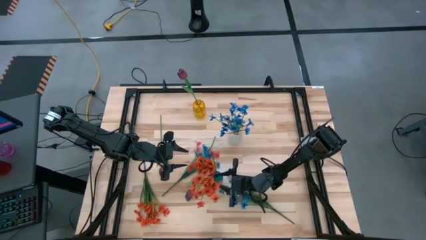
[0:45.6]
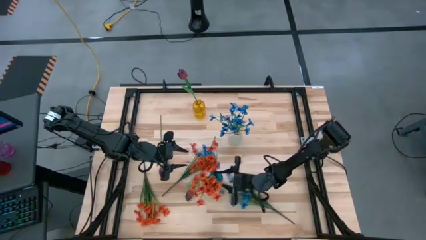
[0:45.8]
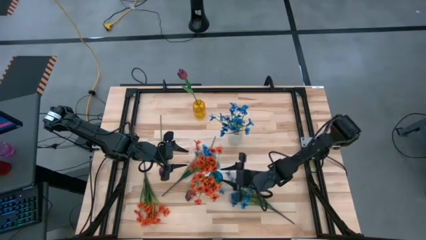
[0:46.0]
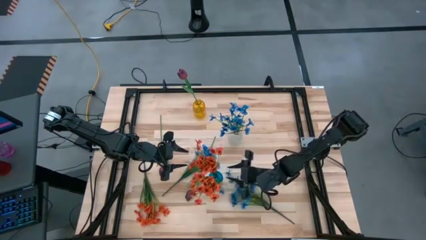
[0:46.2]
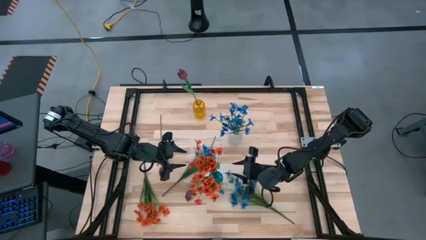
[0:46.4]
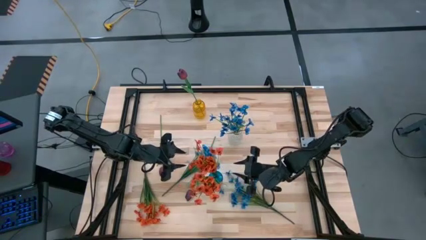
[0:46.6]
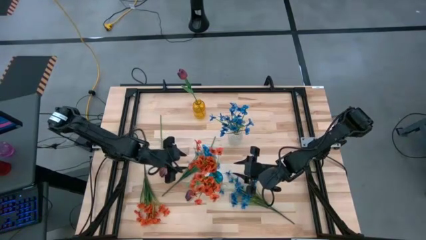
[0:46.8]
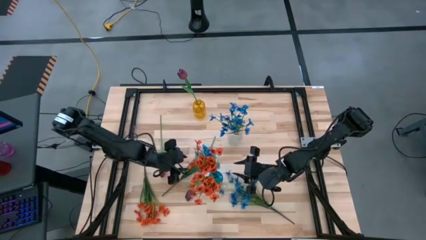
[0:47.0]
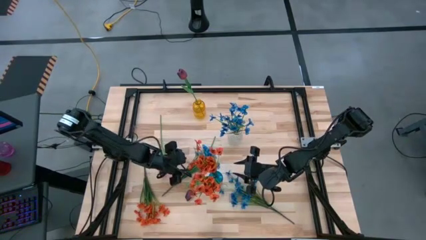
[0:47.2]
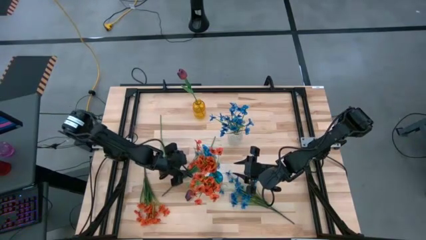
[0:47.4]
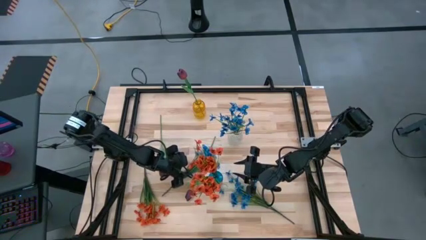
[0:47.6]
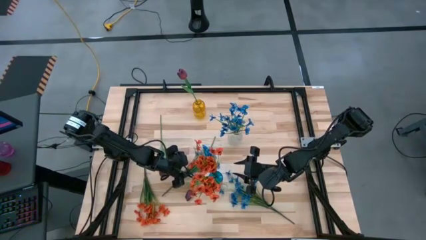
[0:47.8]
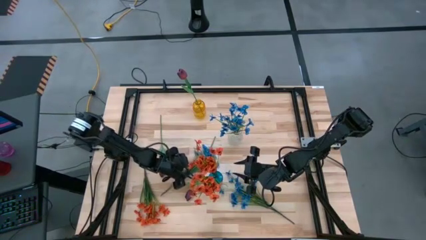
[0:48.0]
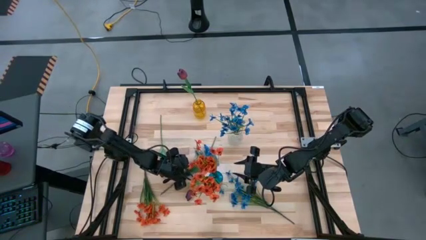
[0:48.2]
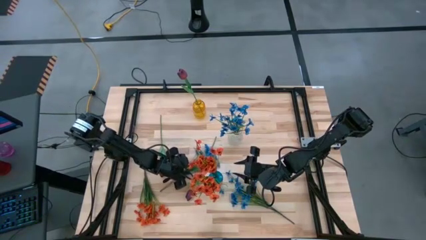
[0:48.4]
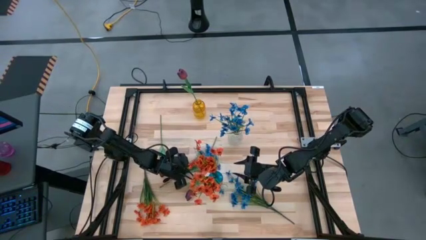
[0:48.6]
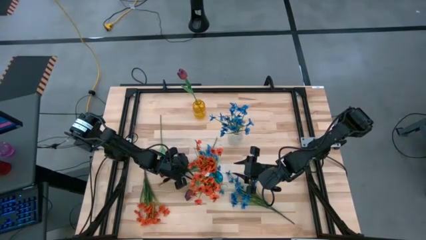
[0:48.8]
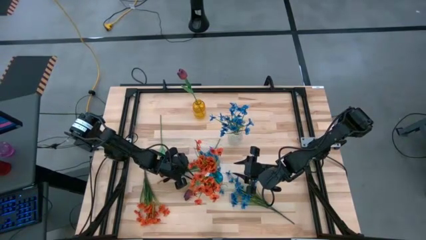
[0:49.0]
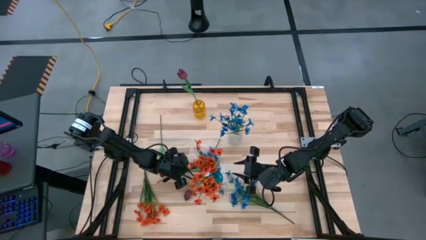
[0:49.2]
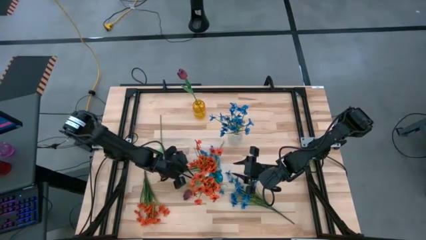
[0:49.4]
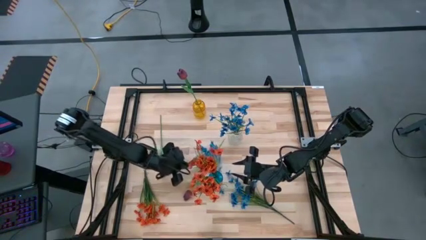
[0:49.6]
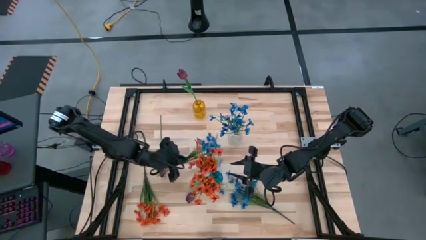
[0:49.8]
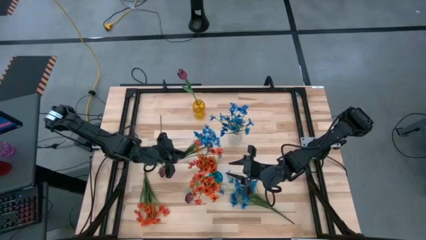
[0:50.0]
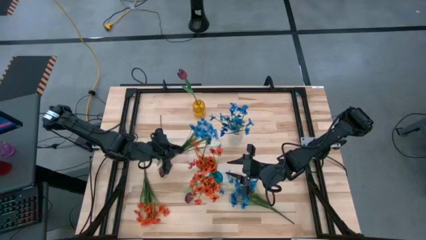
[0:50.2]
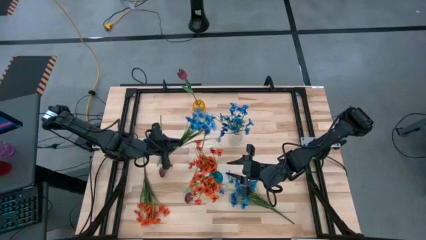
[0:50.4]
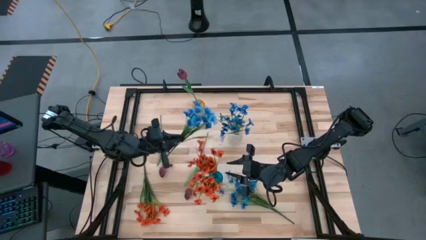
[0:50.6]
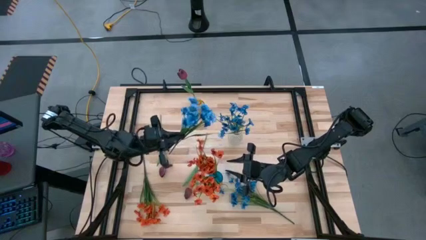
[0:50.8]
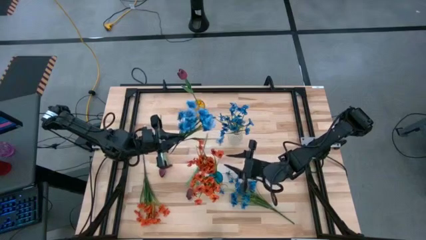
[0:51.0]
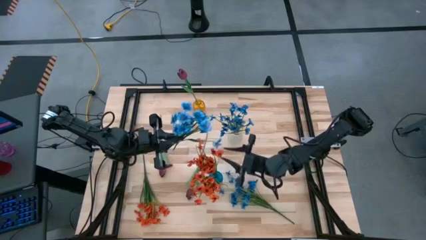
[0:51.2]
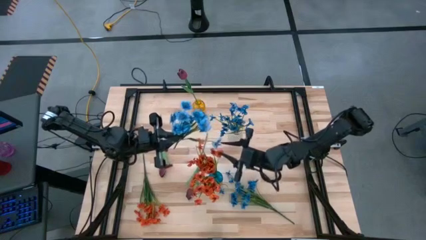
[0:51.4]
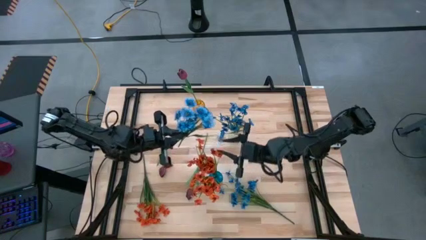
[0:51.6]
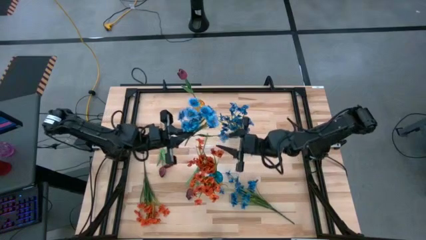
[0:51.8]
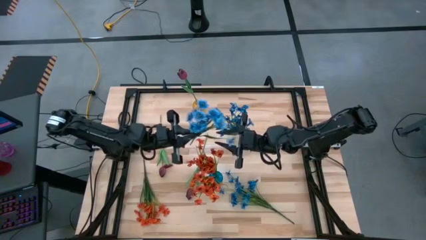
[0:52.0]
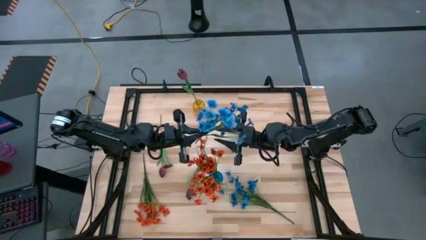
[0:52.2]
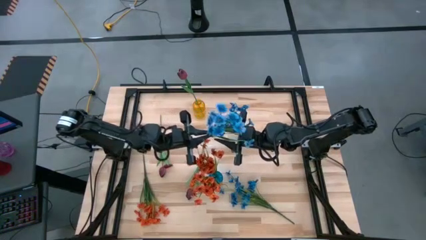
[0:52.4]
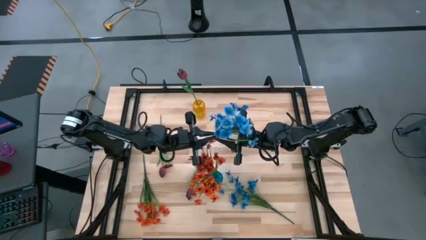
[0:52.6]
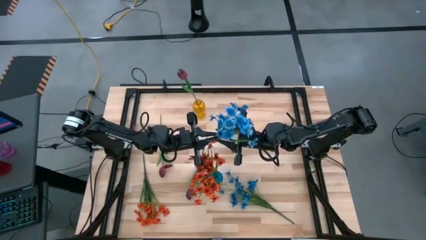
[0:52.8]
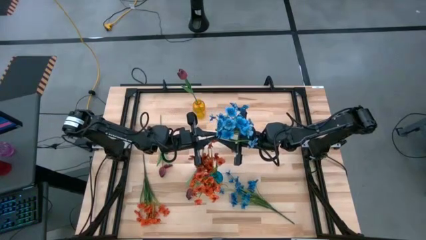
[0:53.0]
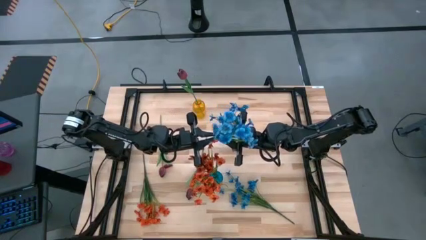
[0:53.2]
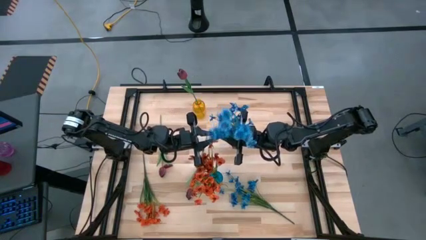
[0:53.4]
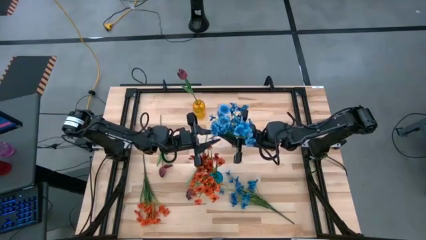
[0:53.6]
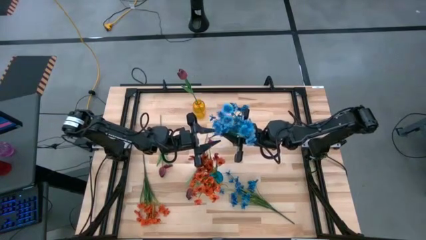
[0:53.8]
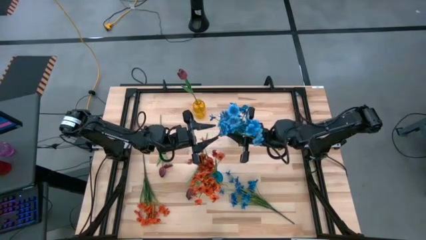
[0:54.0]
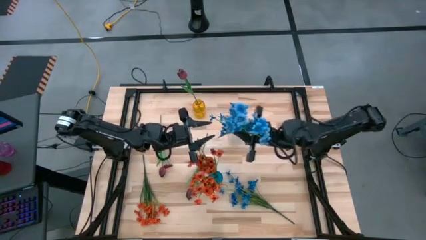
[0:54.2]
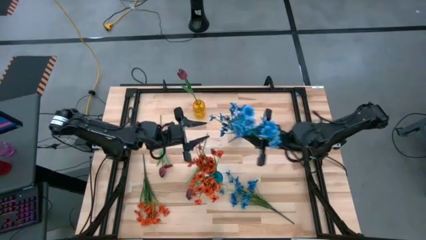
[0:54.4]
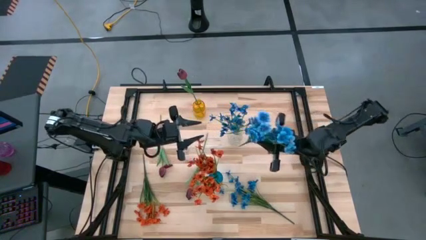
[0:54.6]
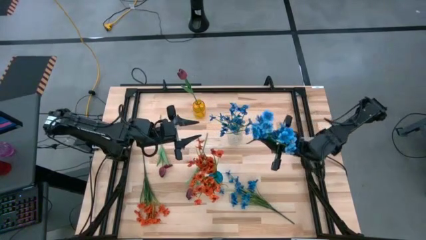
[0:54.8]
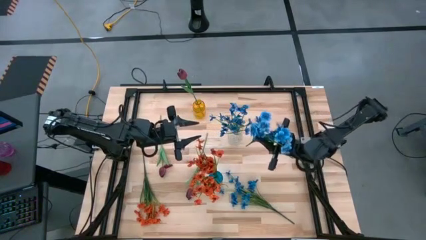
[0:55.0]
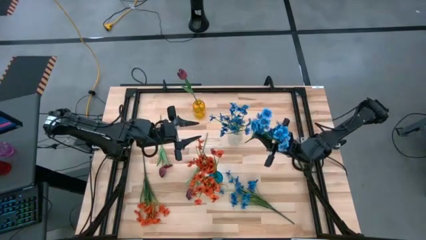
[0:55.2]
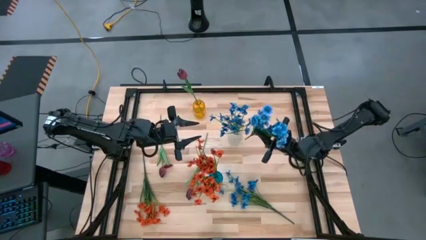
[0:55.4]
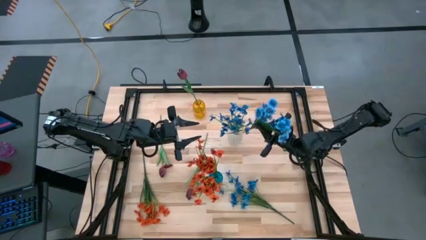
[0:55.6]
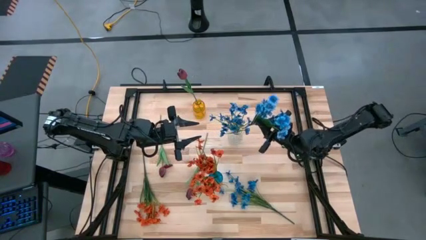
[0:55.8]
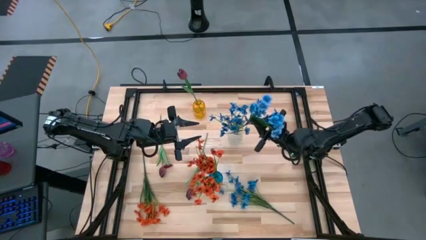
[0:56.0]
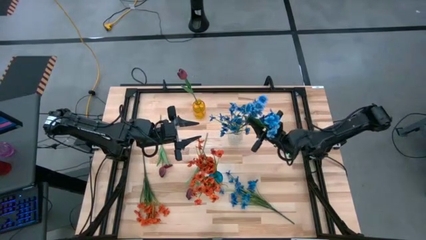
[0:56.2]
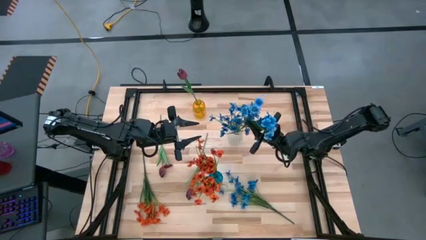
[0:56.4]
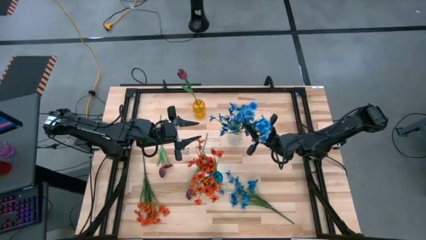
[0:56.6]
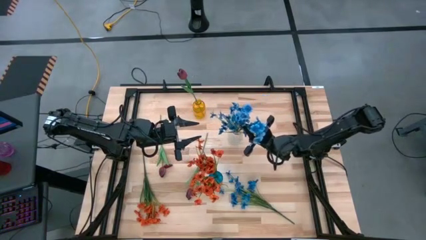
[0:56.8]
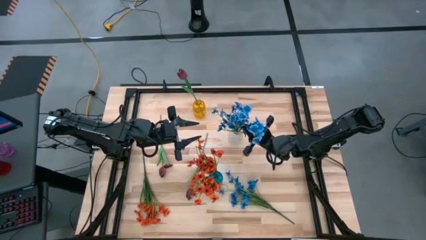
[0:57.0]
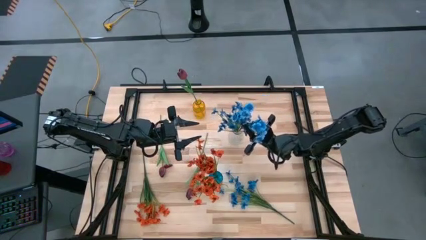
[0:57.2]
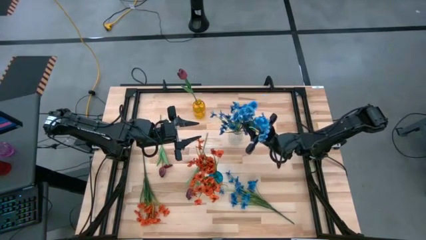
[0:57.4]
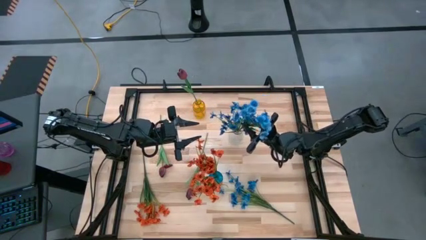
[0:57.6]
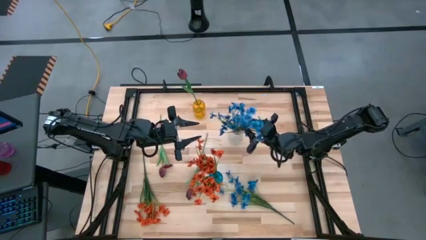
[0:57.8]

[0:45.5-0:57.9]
Task: Sort flowers into vase by color
Put the left blue flowers into the transparent vase

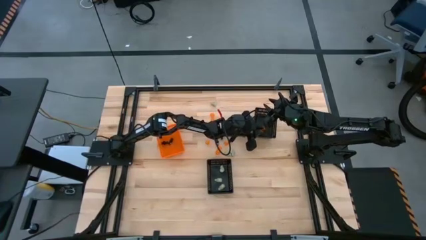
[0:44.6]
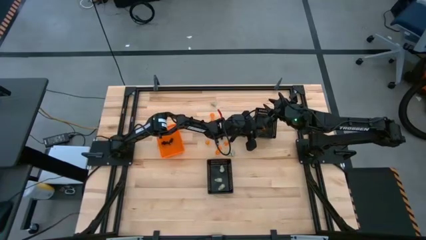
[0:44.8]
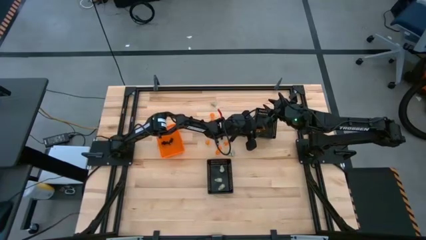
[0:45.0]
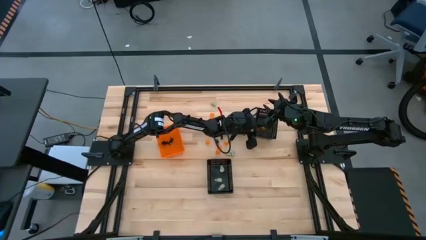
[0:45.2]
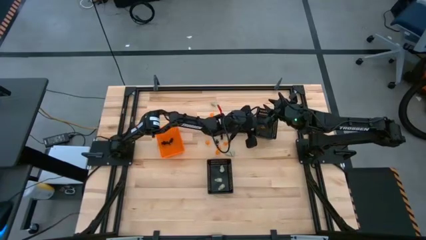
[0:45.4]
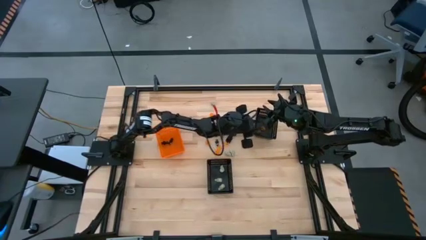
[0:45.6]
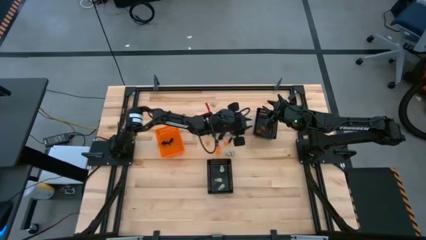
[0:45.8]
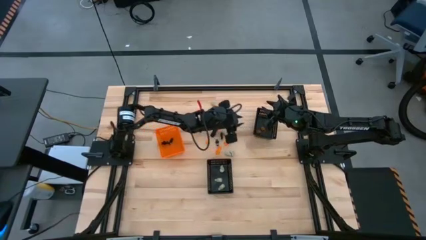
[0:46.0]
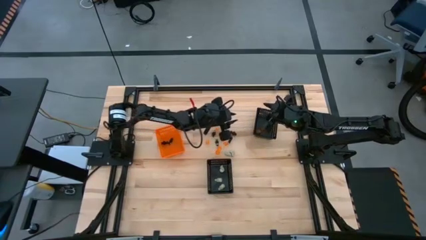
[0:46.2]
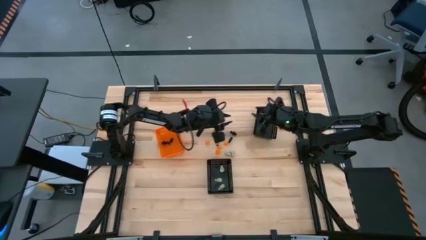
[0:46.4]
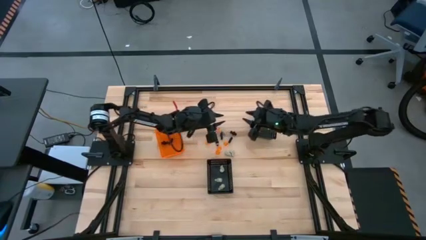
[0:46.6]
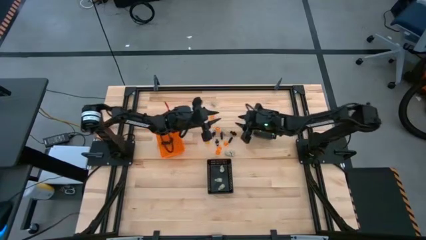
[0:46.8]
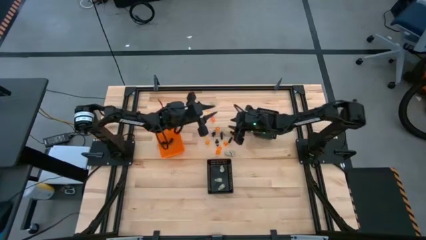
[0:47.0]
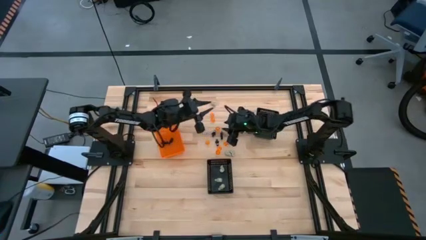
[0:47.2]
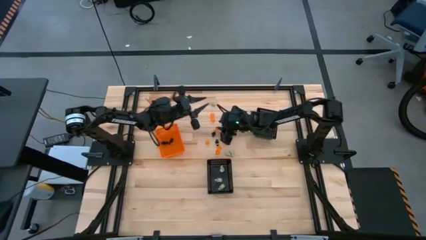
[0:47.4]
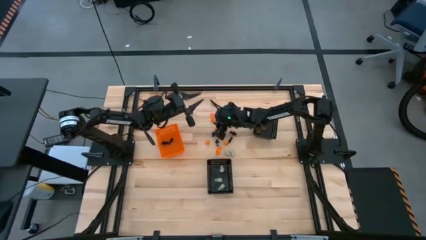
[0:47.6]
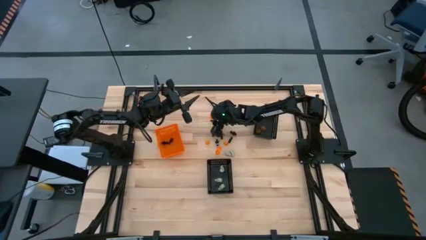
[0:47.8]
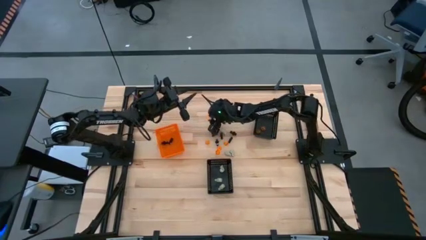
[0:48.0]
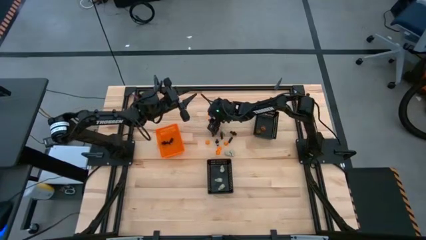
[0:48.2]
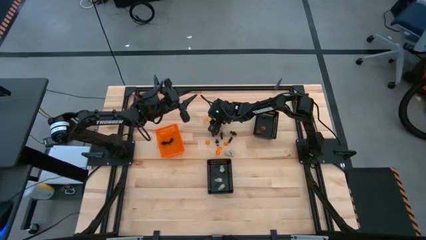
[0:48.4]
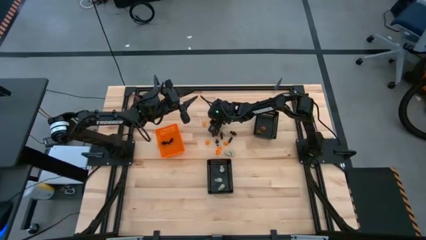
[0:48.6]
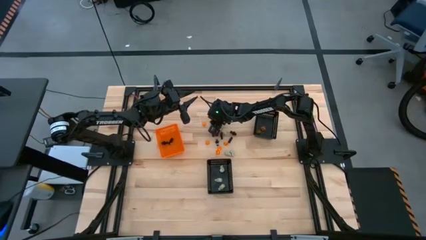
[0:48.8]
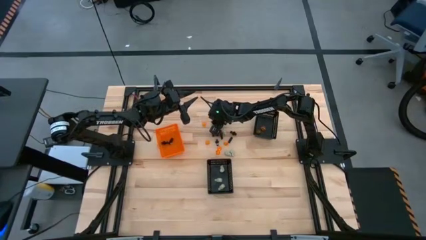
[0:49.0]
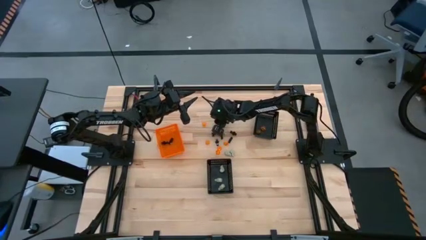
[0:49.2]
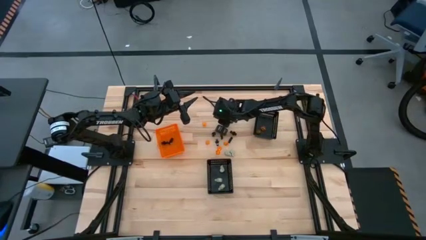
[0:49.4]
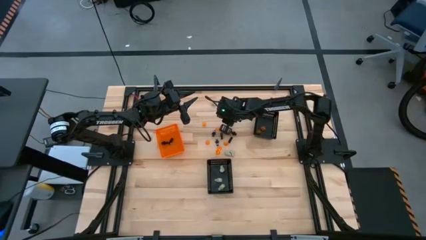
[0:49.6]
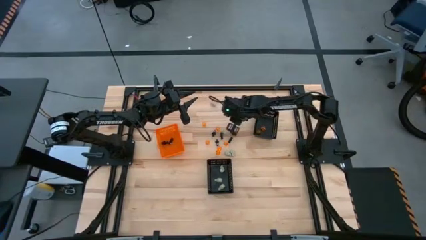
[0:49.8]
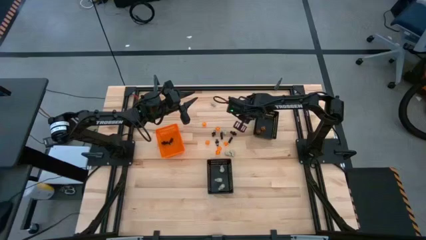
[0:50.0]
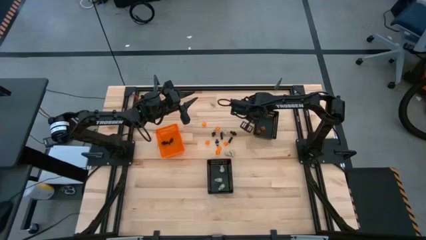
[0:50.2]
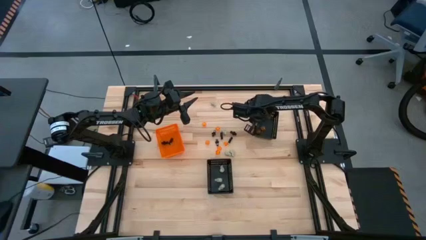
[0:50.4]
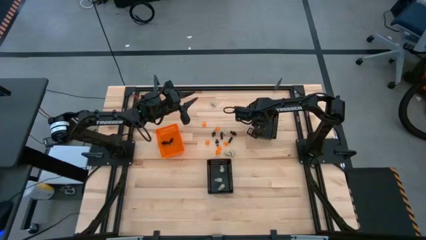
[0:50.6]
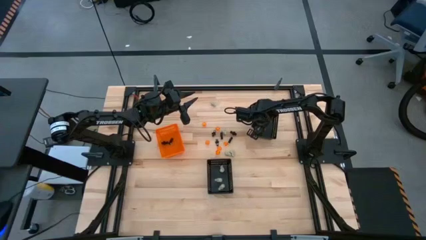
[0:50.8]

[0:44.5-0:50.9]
Task: Sort Halloween decoration
Put the orange pumpkin toy into the top black bin
